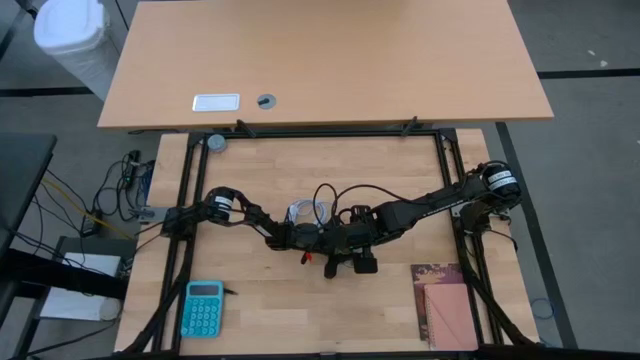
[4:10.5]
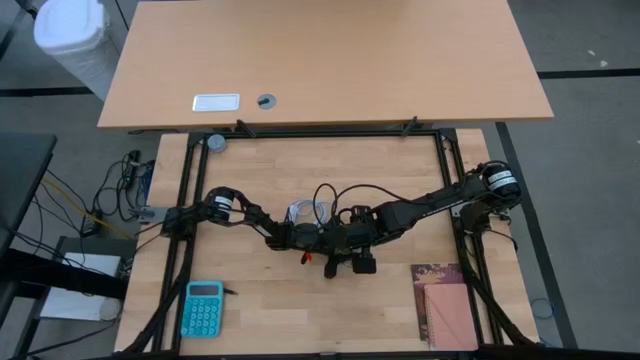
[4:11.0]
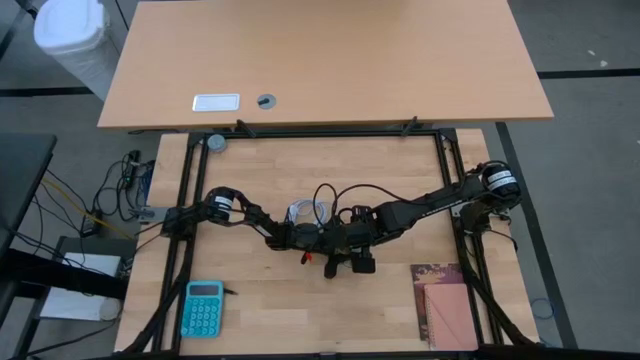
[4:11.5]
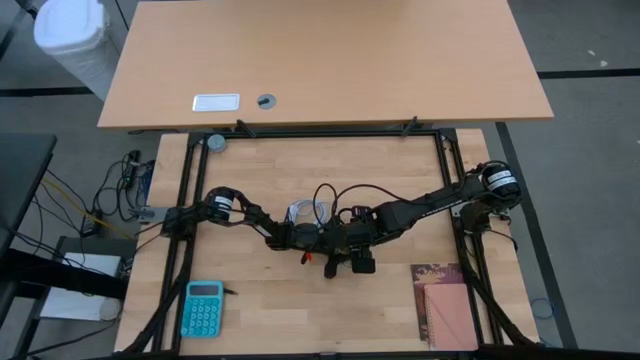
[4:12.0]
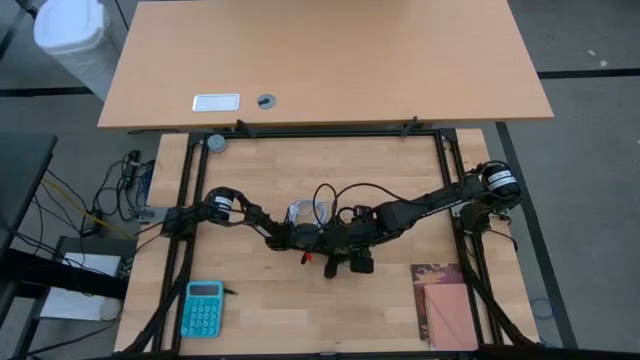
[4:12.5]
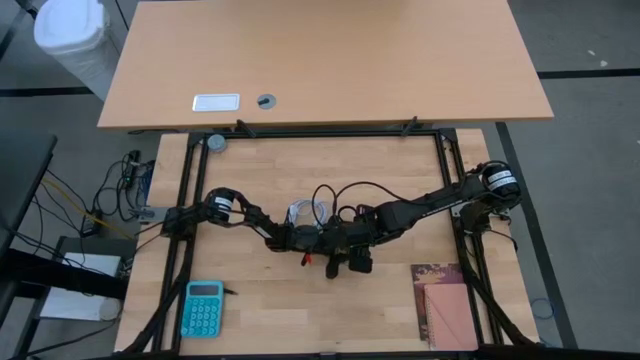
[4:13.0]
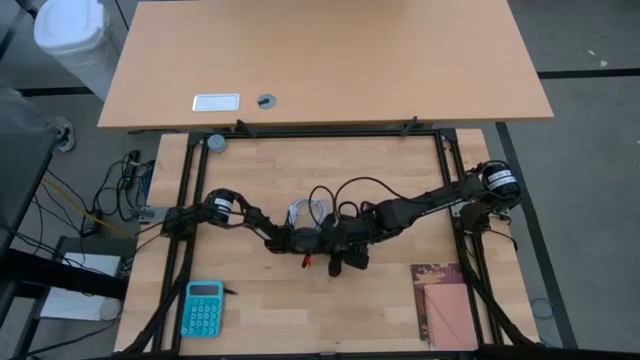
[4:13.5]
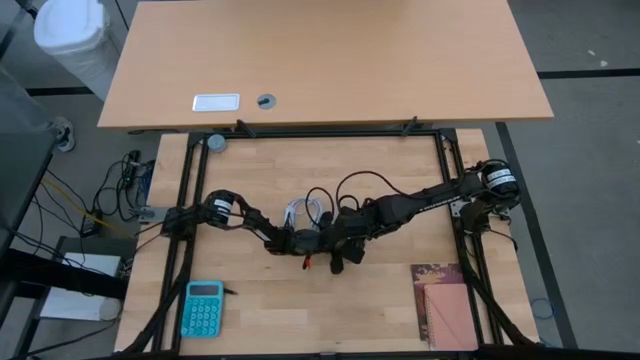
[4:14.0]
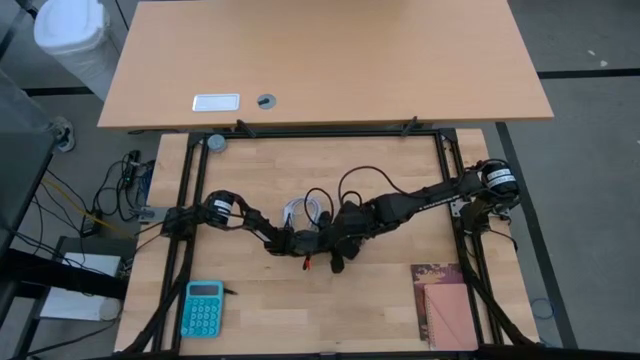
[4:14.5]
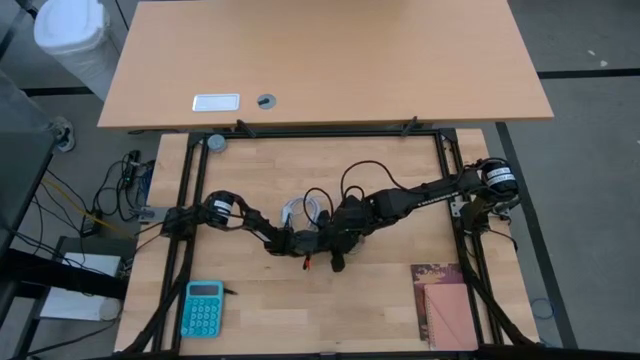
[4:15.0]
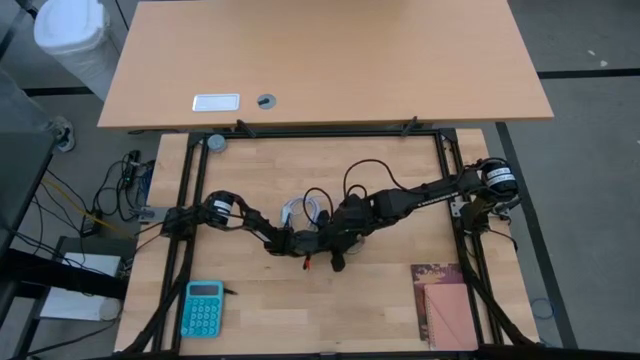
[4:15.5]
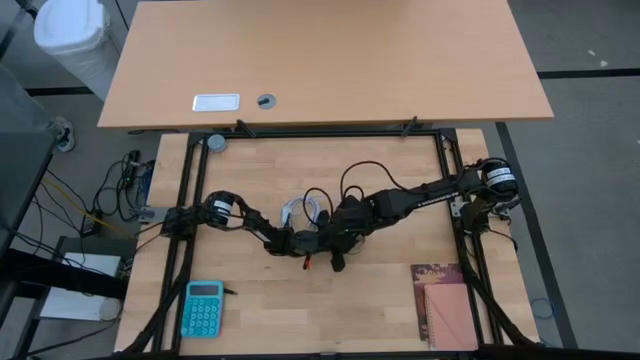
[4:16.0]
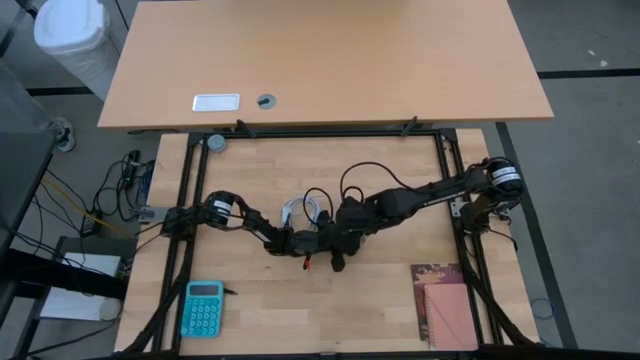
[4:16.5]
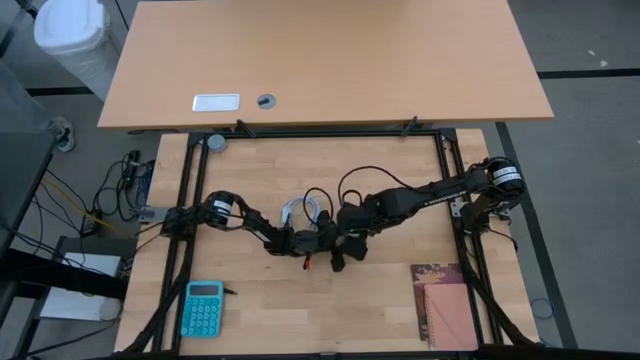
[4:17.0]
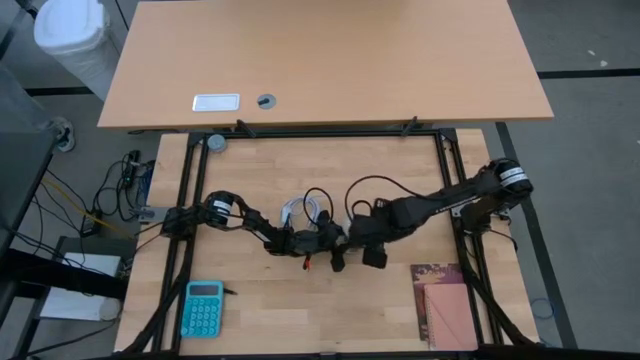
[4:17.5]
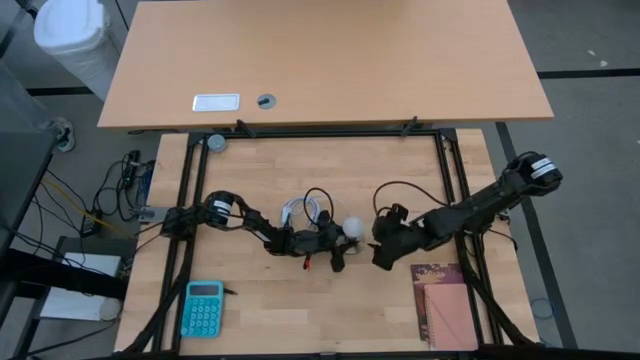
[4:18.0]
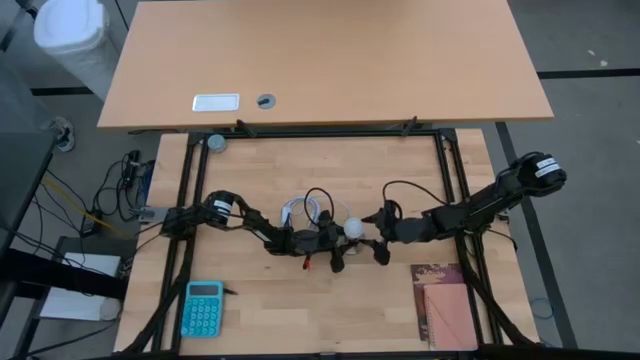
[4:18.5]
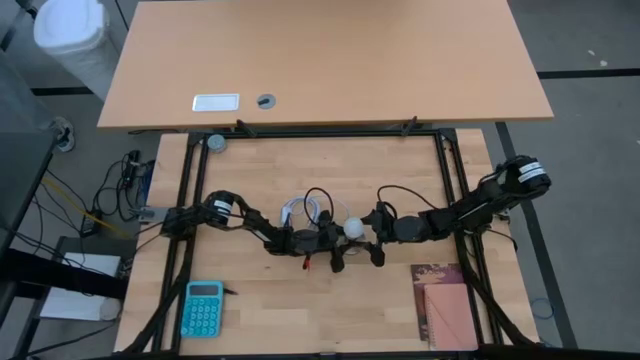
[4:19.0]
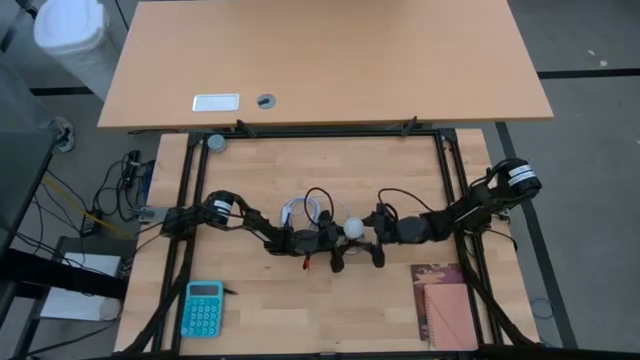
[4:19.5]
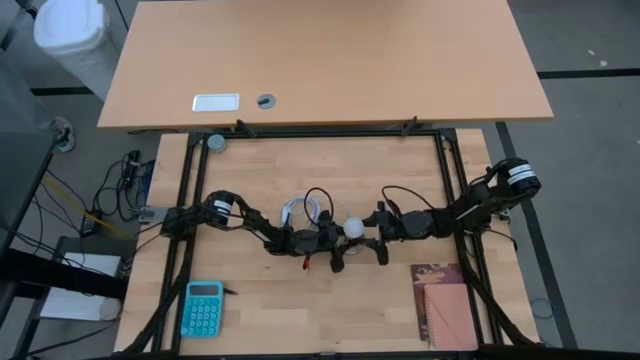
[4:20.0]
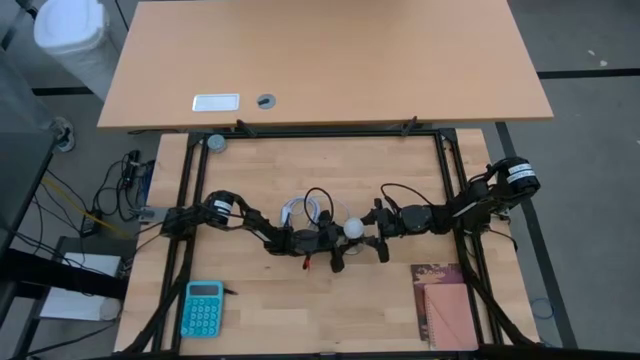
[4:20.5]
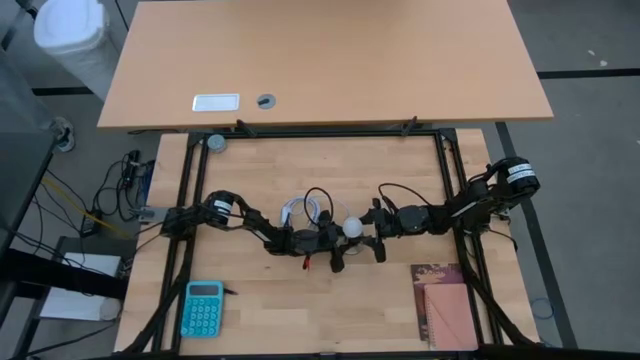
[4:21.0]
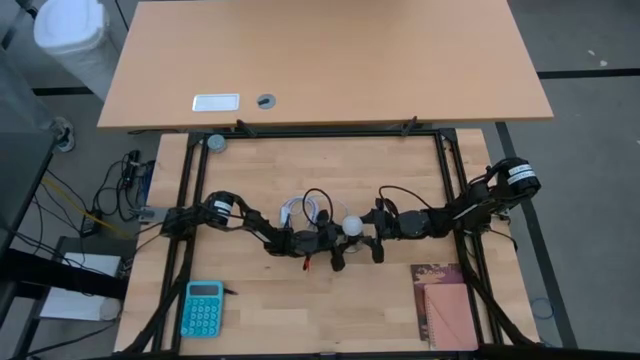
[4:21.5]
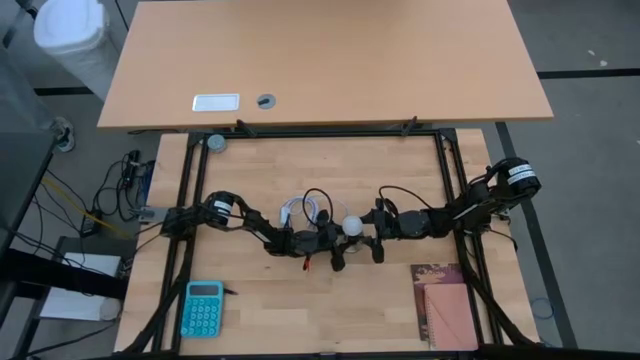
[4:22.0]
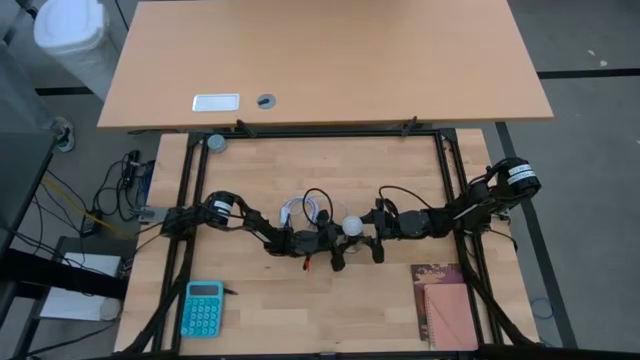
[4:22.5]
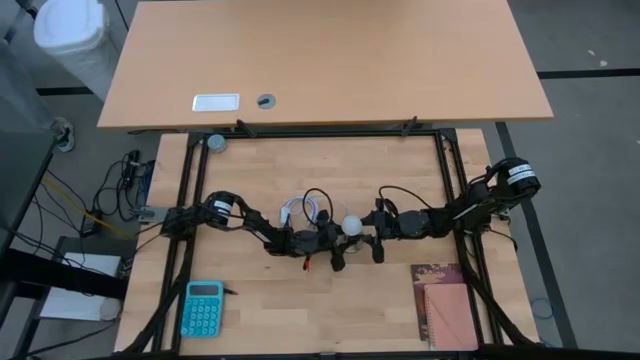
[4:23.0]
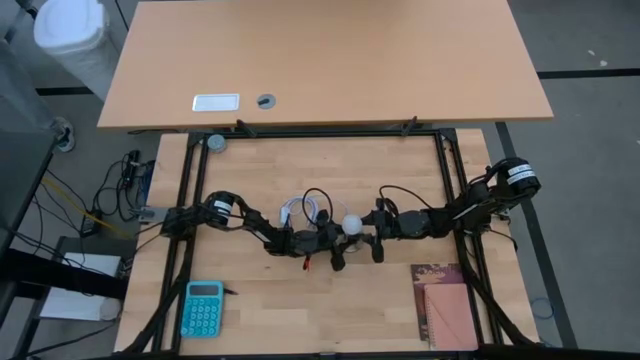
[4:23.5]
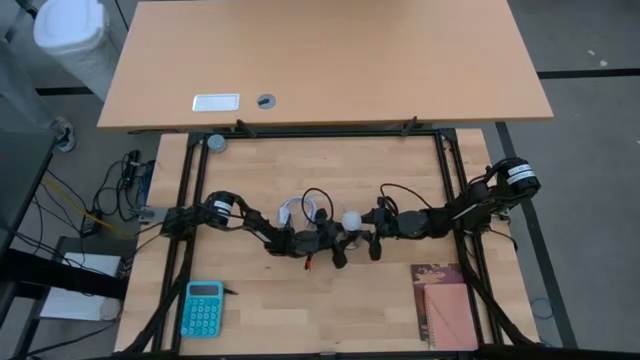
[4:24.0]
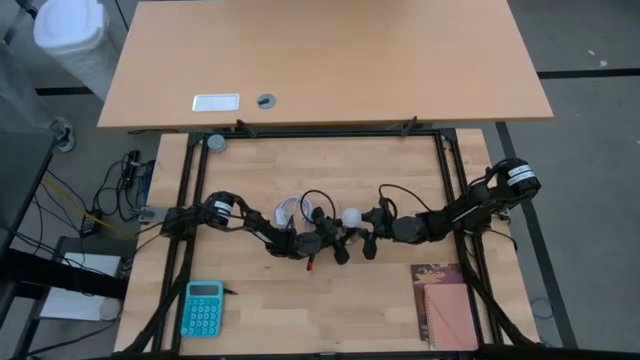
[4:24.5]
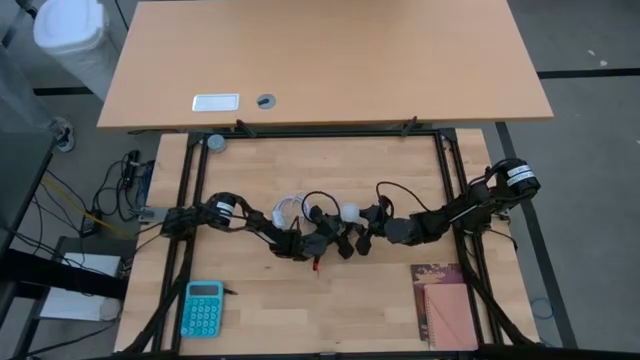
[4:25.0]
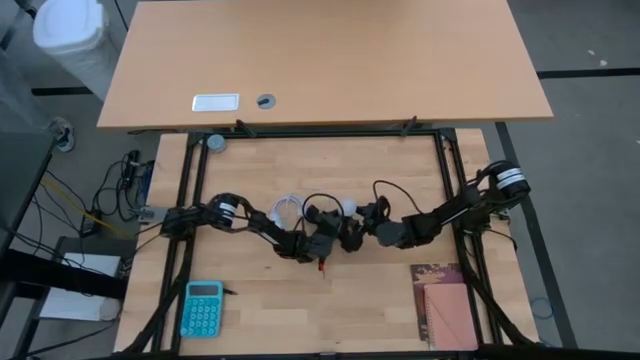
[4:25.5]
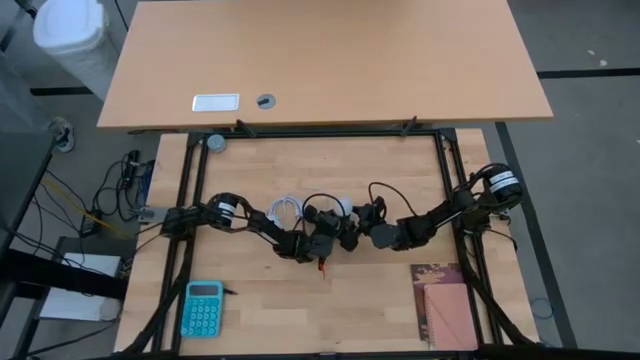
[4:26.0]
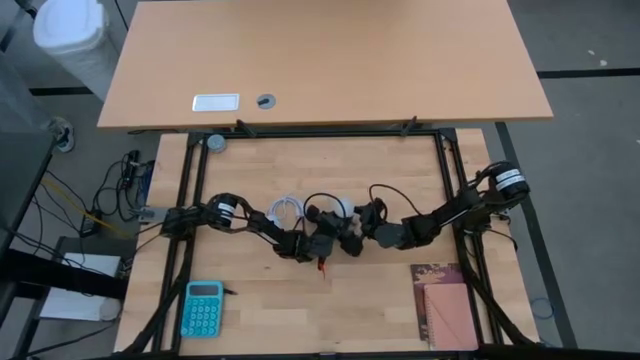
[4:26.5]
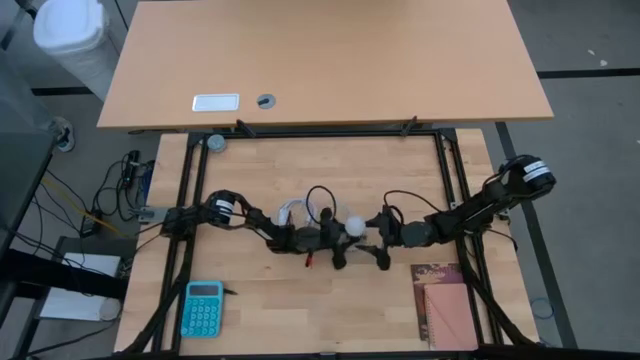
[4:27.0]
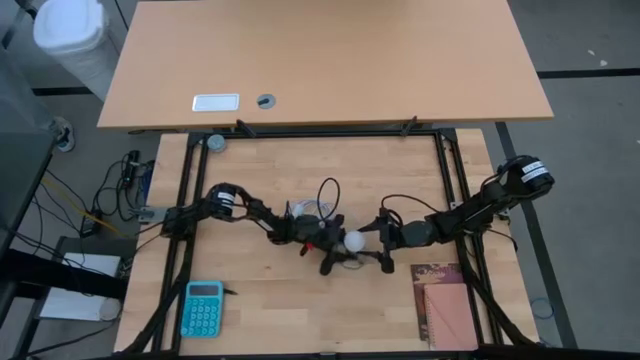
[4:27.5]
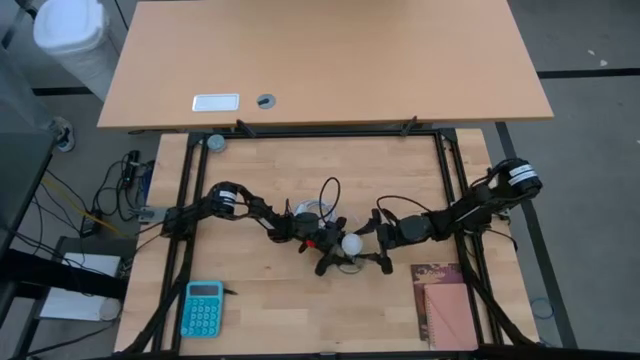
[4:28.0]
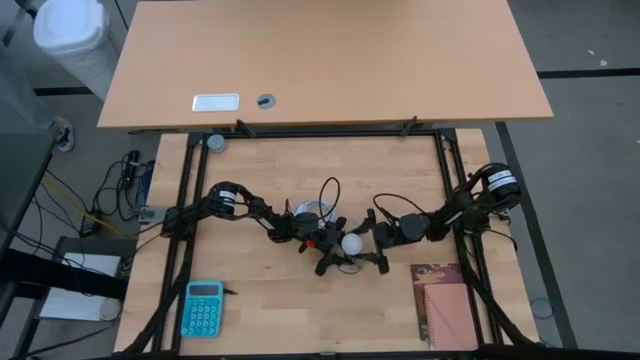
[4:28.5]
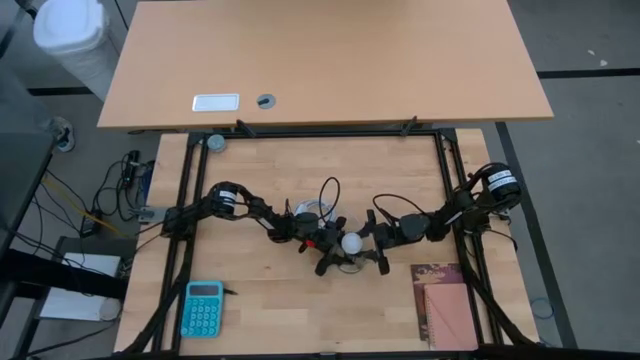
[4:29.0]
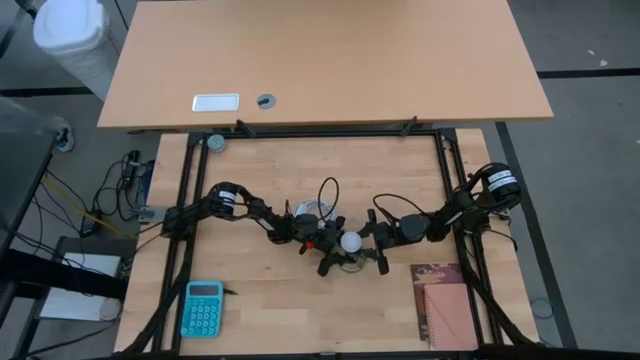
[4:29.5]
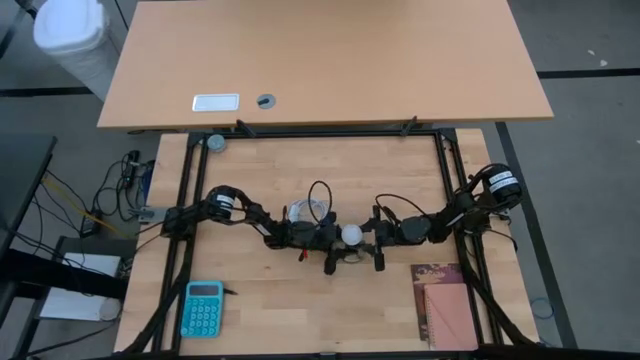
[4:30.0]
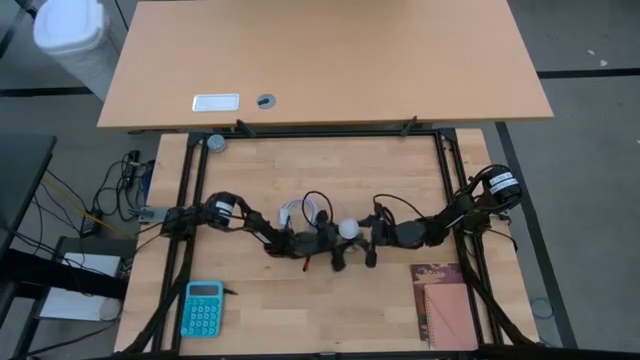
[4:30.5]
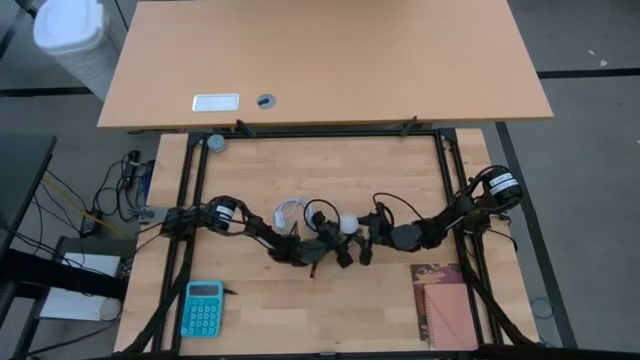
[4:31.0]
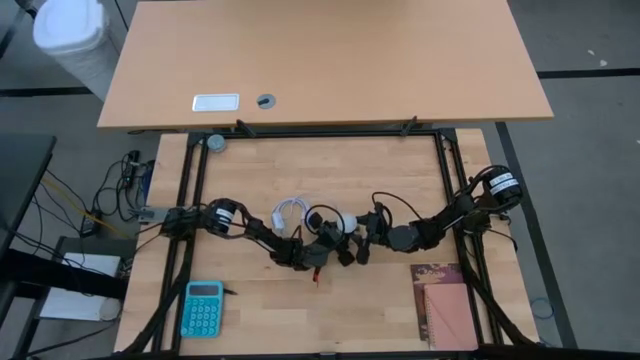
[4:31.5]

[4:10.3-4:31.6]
Task: Screw lightbulb
Insert the white lightbulb into the lamp socket
